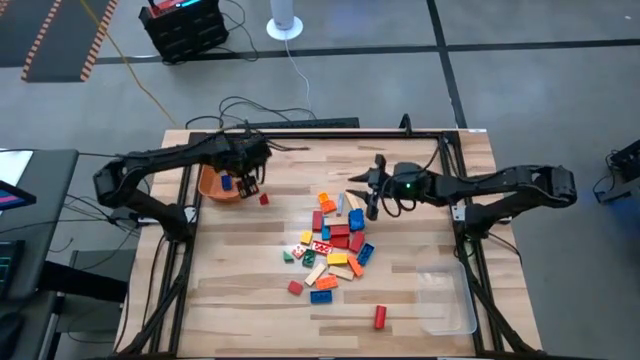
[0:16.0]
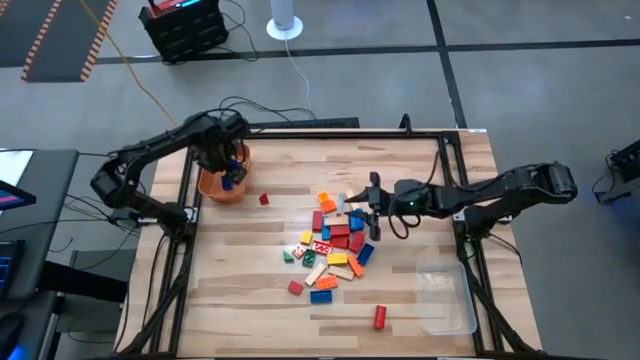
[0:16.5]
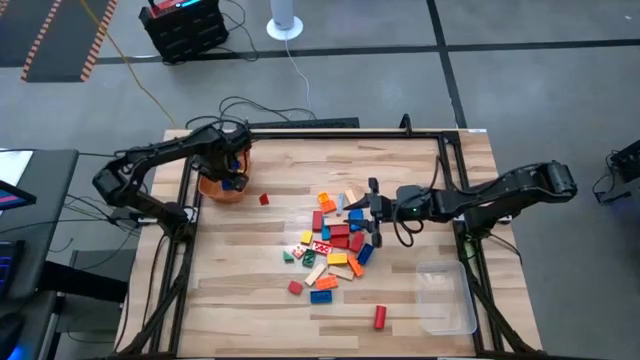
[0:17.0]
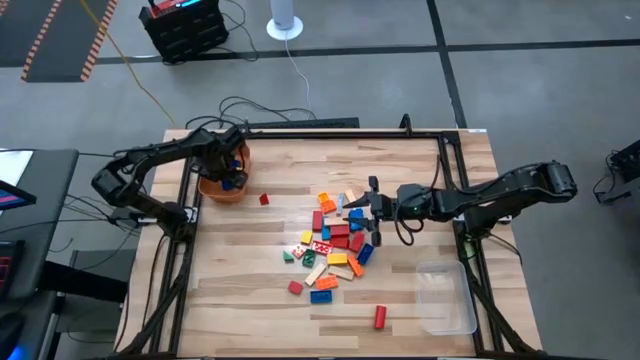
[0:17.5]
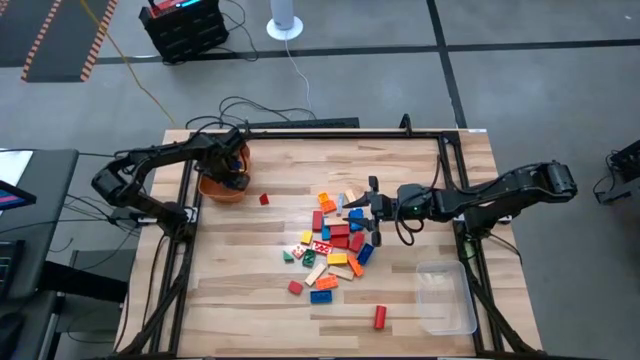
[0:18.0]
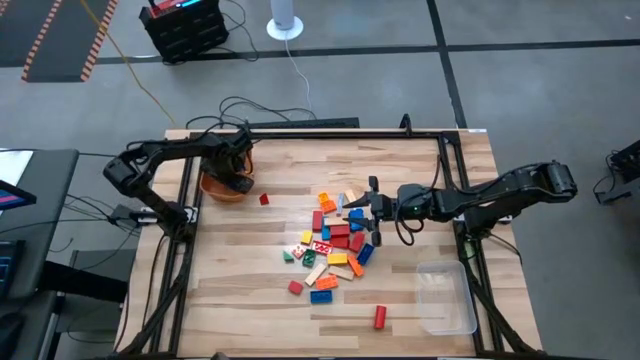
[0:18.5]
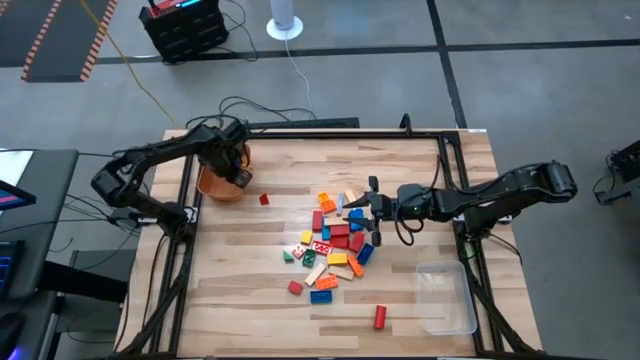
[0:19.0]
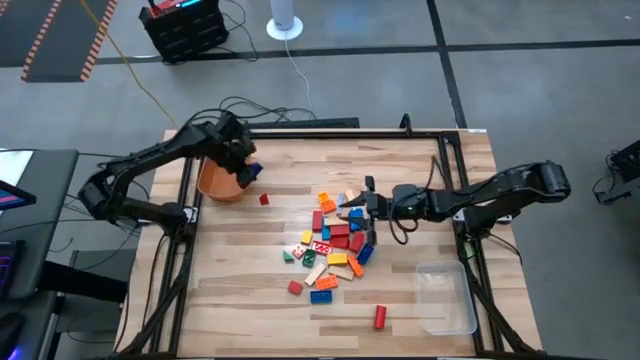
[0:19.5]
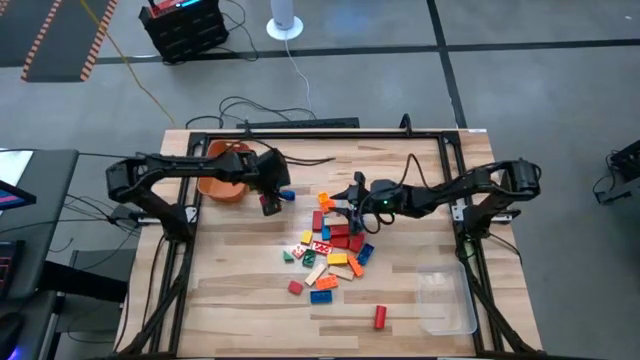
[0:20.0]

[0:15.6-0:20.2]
Task: Sort blocks by size
Remove the small blue game piece from the orange bin

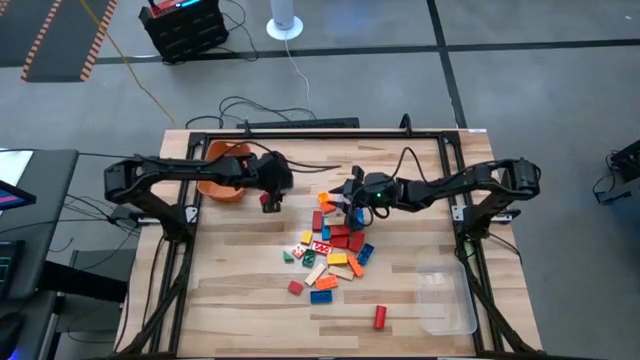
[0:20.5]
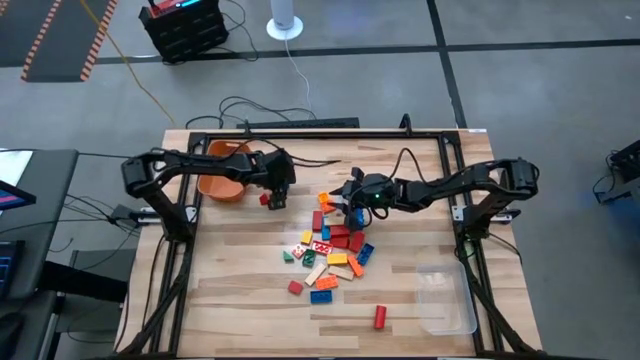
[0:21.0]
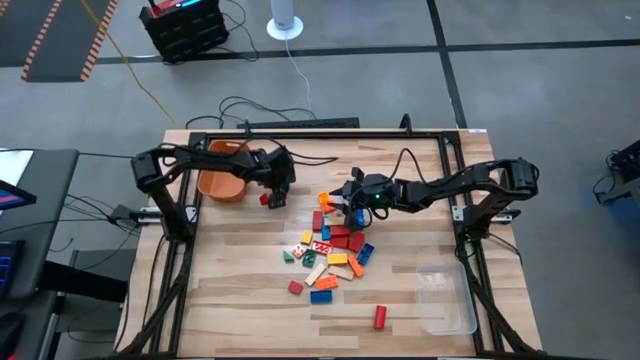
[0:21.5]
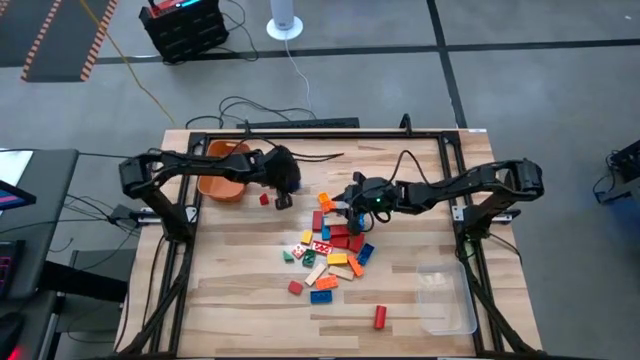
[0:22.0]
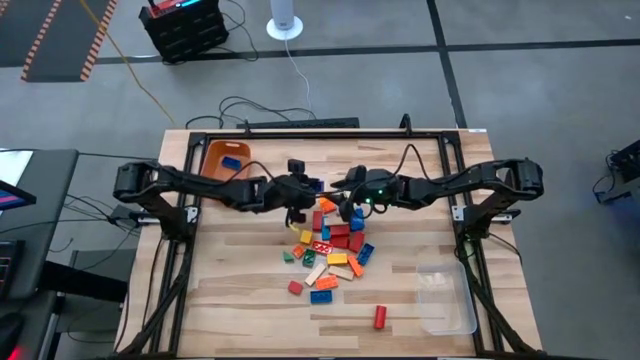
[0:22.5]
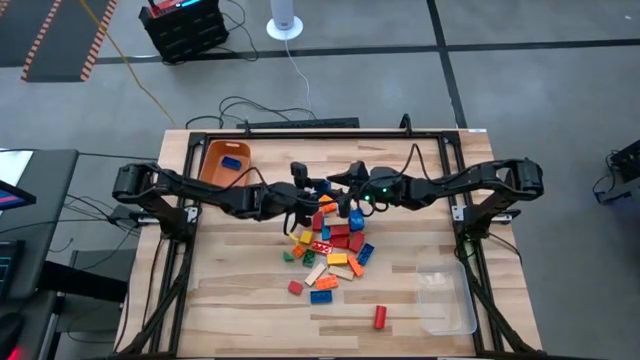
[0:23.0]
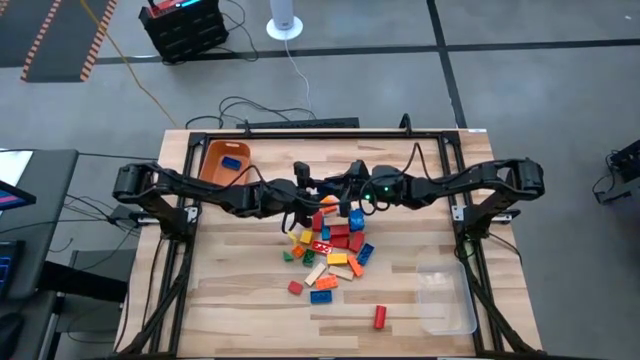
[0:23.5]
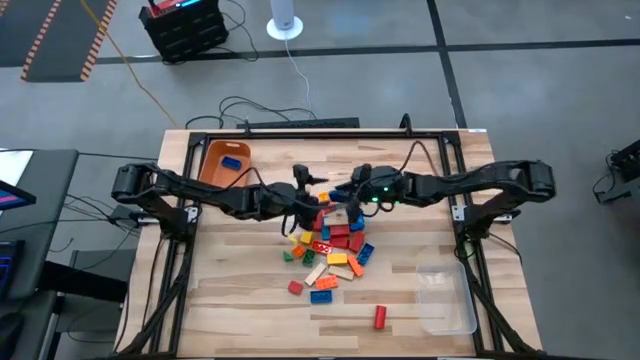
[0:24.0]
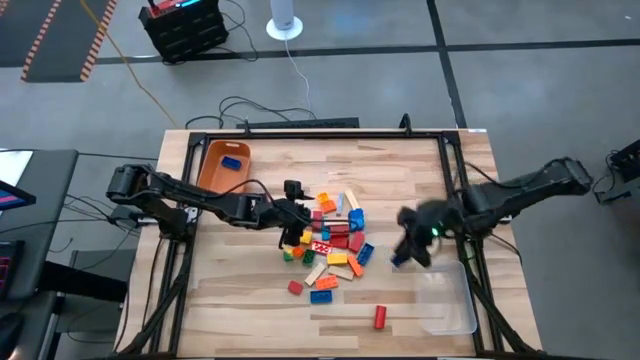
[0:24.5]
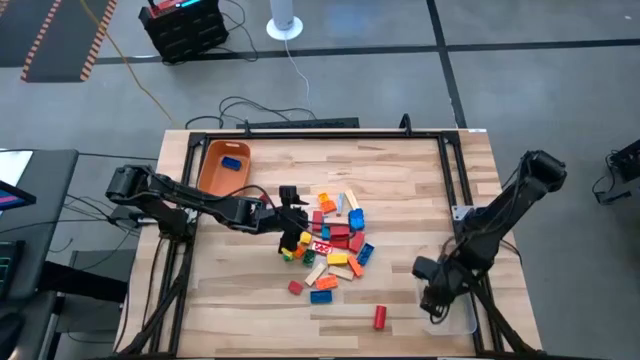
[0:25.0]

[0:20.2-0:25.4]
Put the small blue game piece into the transparent bin

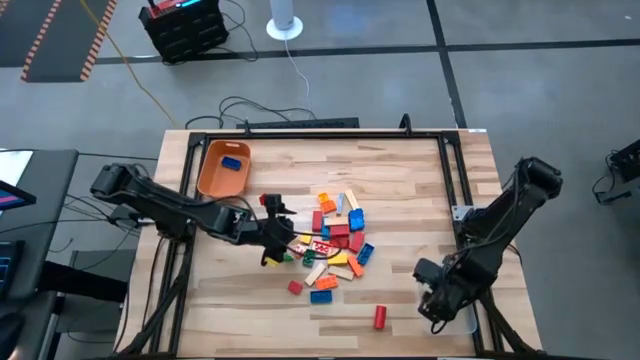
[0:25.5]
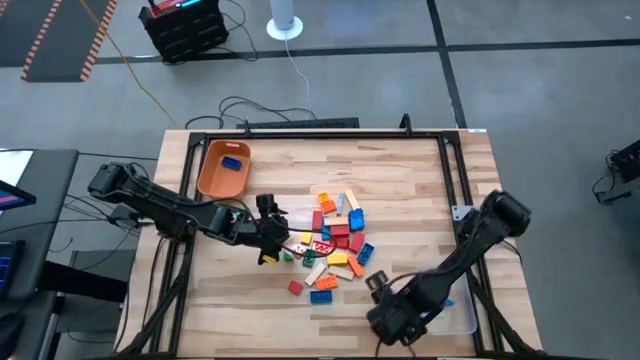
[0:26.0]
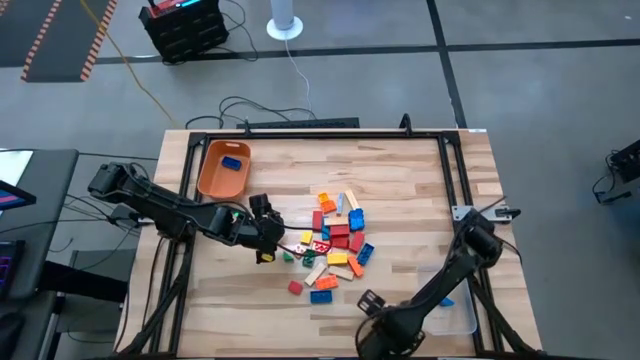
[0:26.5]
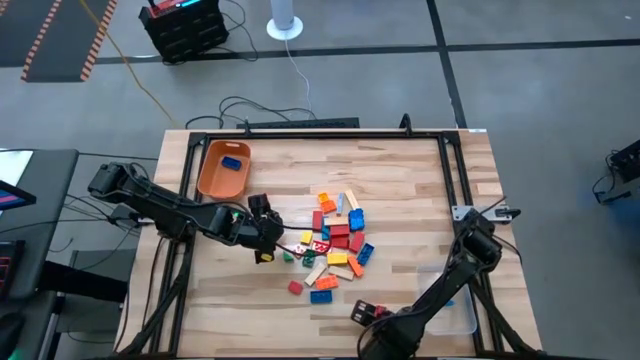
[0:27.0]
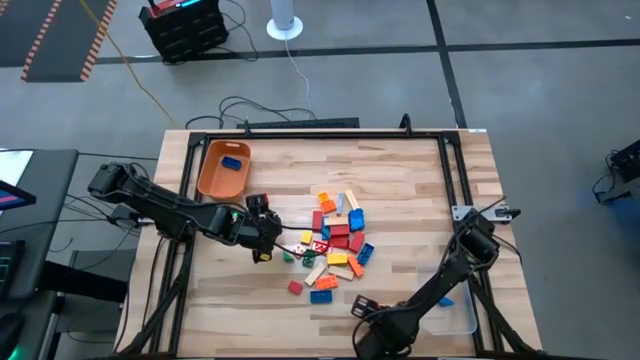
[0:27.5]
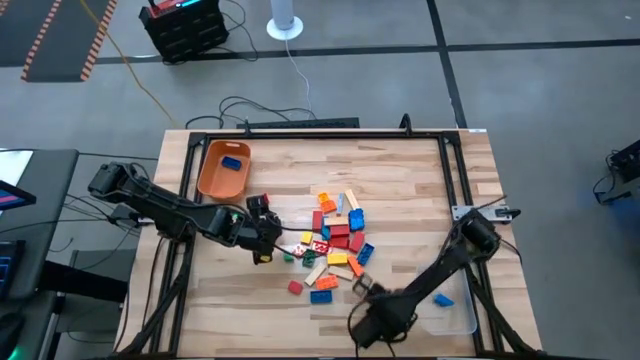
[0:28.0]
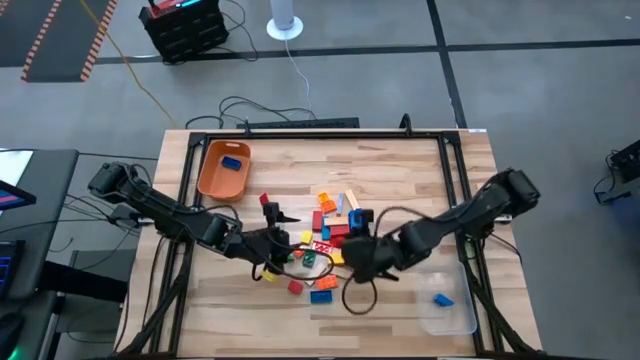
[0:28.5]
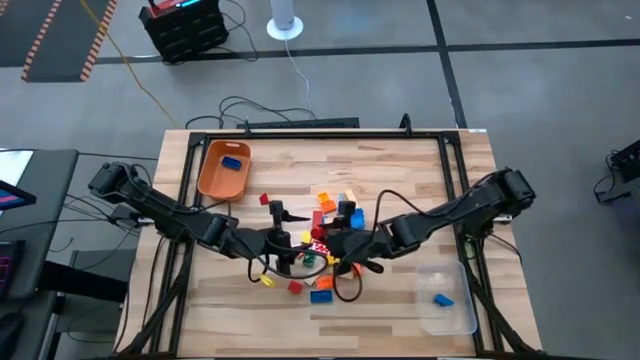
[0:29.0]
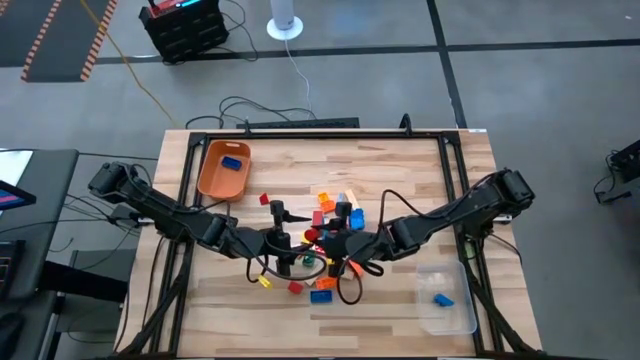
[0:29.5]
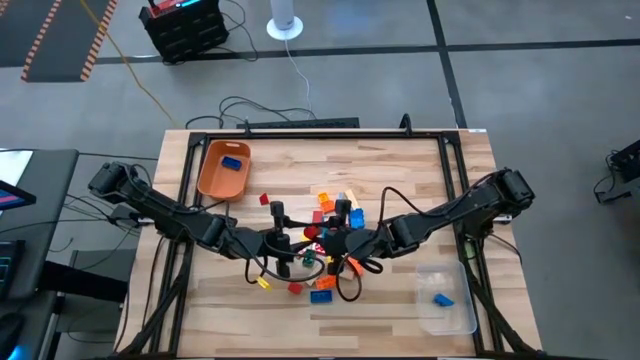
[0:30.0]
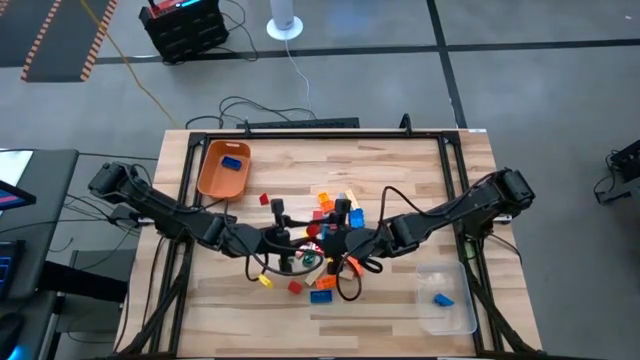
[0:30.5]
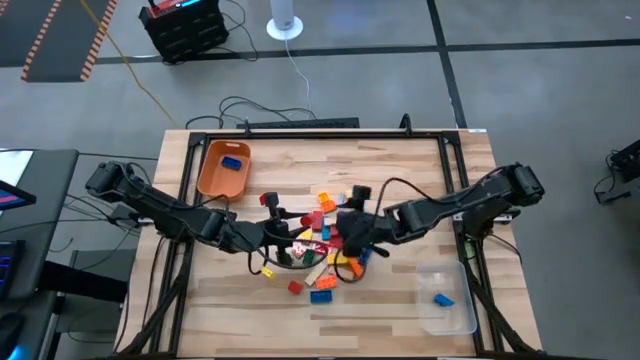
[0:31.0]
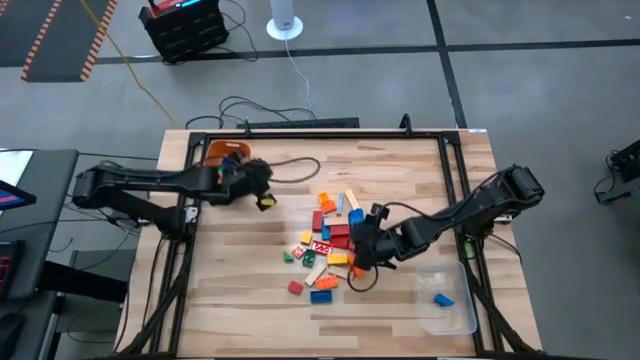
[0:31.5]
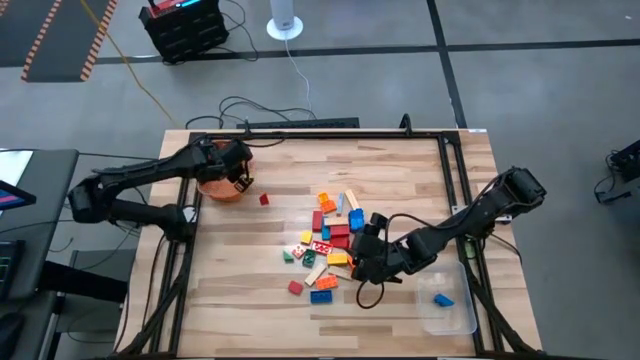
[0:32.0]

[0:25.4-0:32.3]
Put the large red wooden block into the orange bin

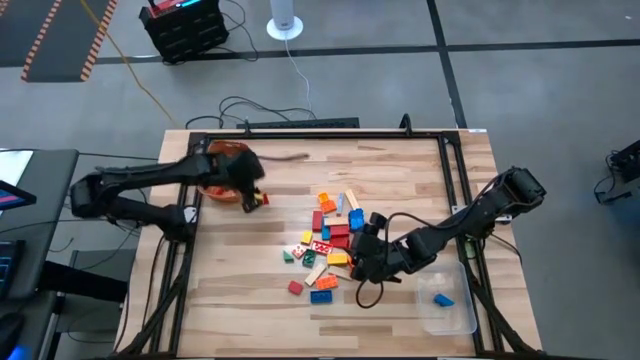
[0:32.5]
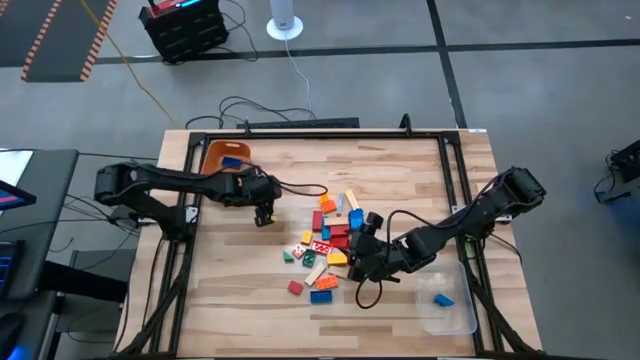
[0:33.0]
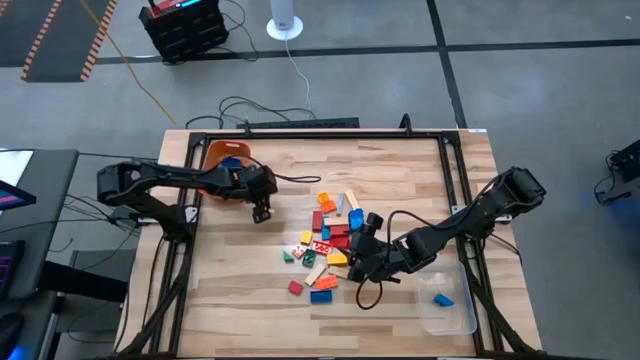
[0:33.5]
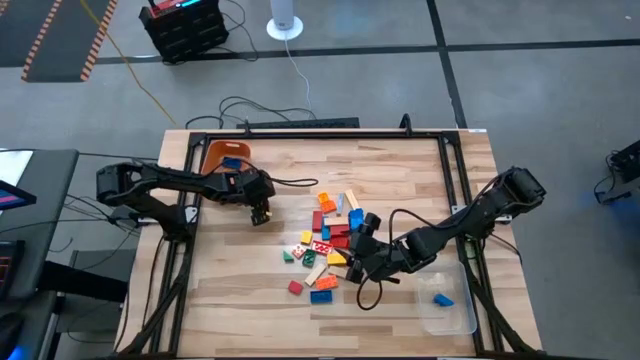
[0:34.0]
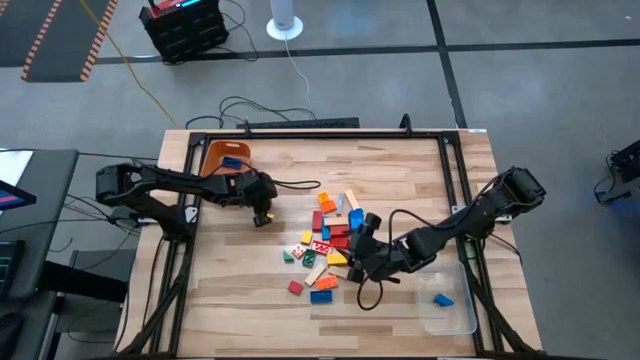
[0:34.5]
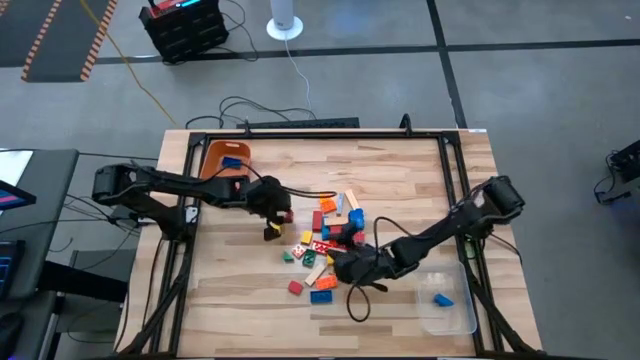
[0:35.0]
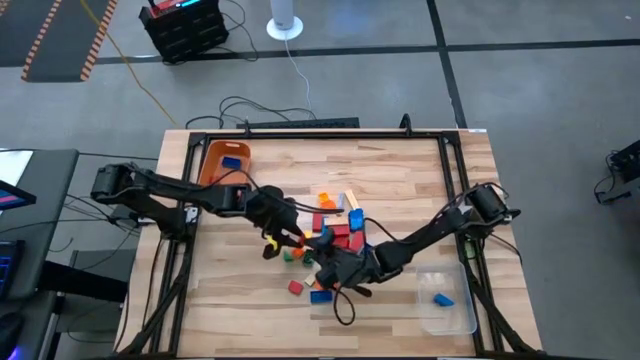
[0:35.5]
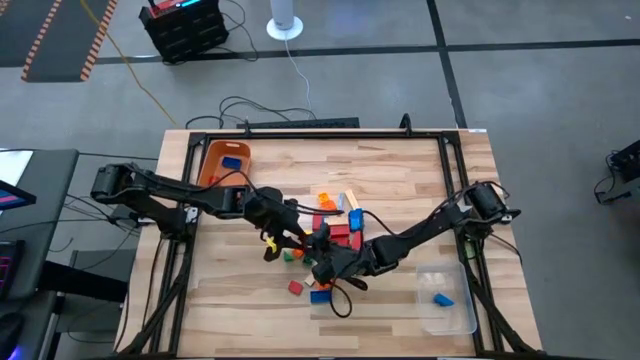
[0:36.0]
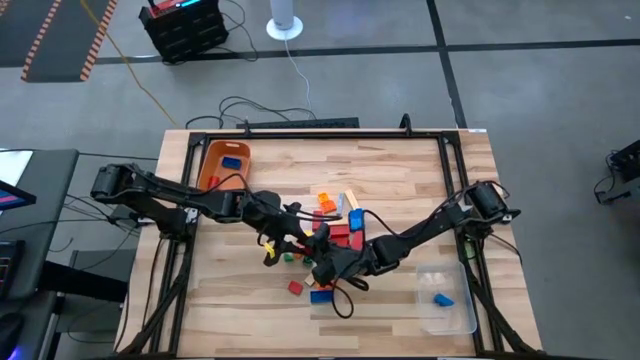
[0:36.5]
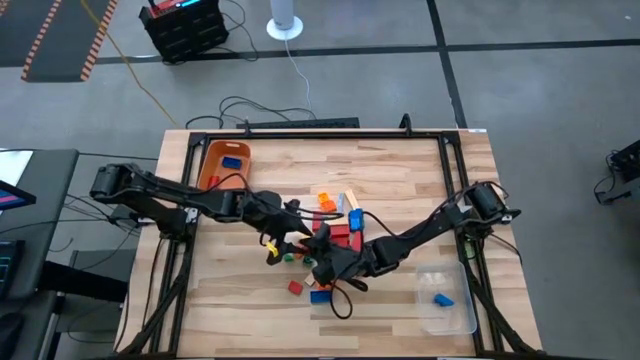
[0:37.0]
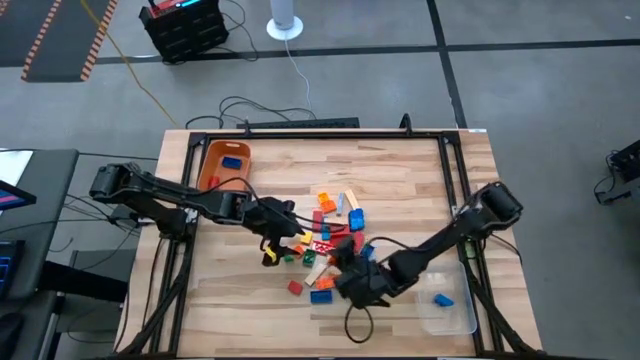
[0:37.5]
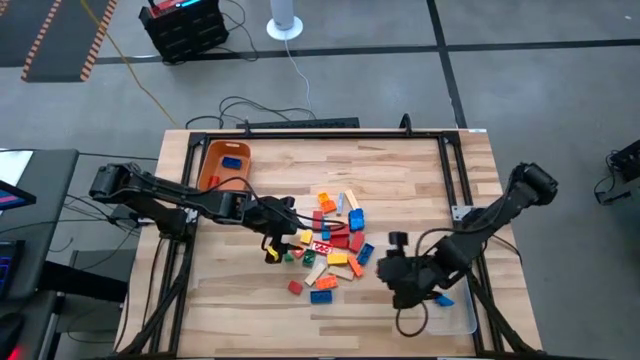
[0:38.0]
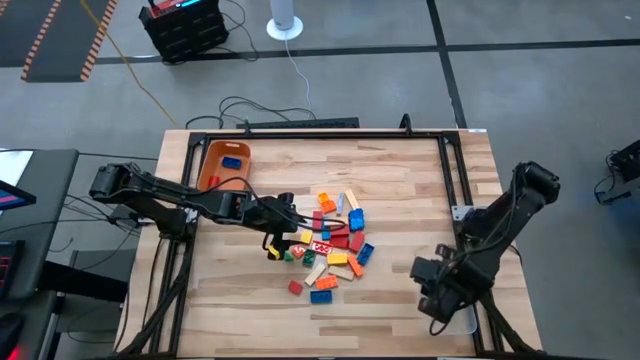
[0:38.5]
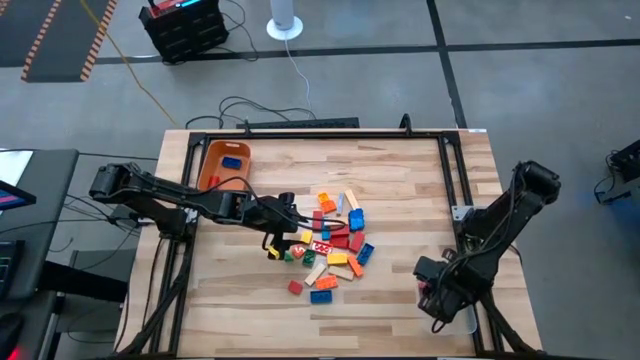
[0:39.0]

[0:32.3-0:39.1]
Put the small red wooden block into the transparent bin
